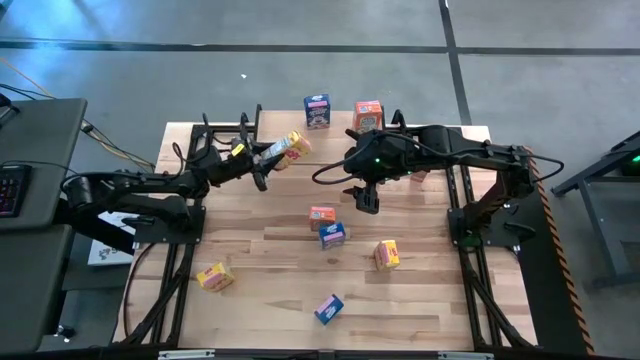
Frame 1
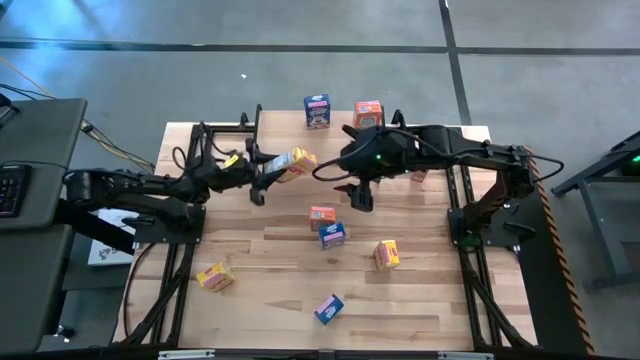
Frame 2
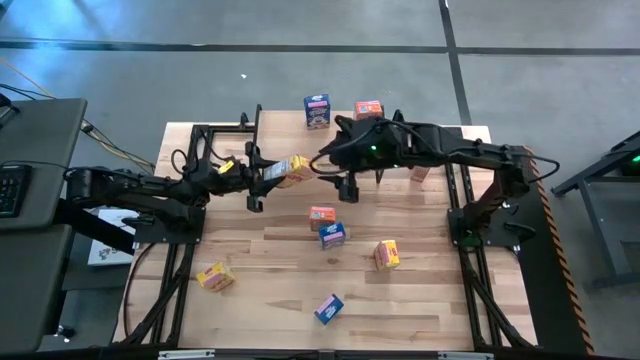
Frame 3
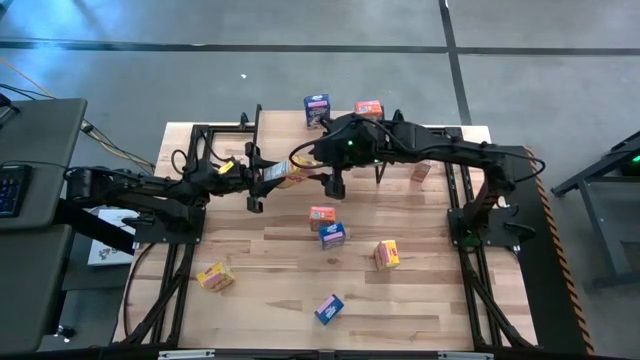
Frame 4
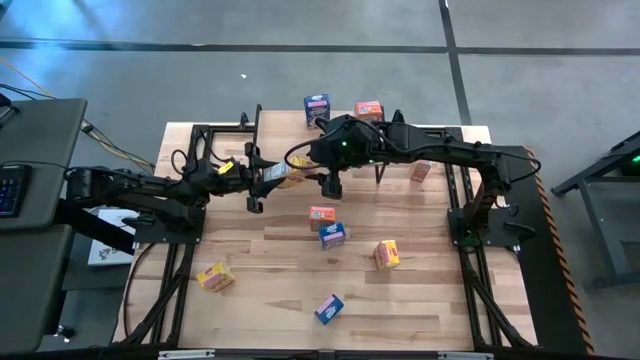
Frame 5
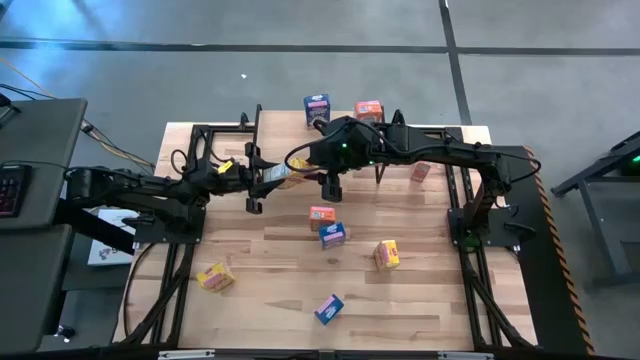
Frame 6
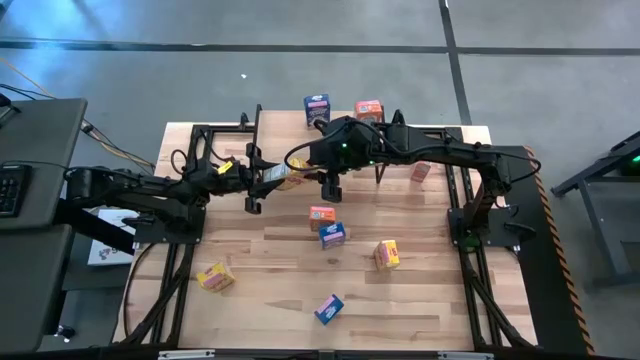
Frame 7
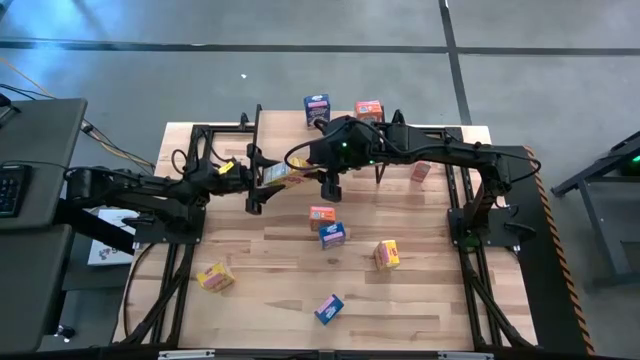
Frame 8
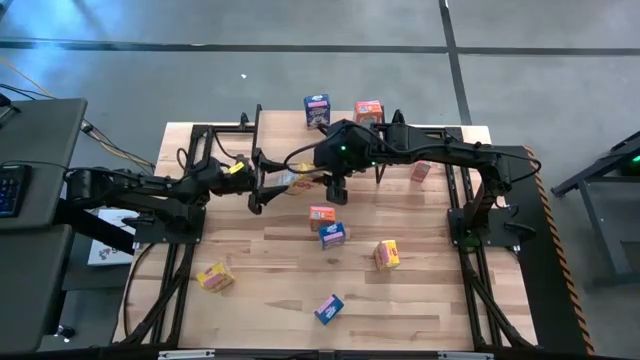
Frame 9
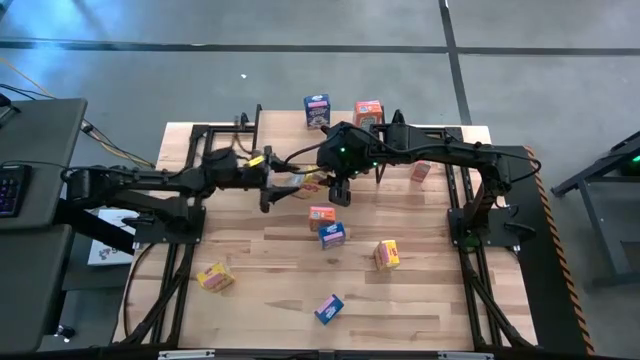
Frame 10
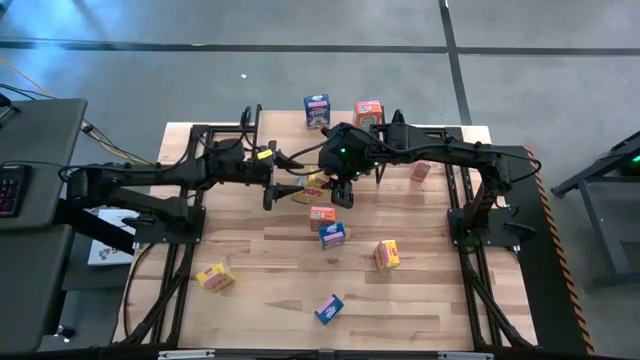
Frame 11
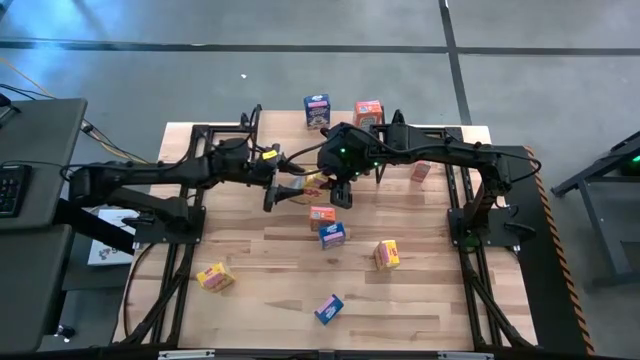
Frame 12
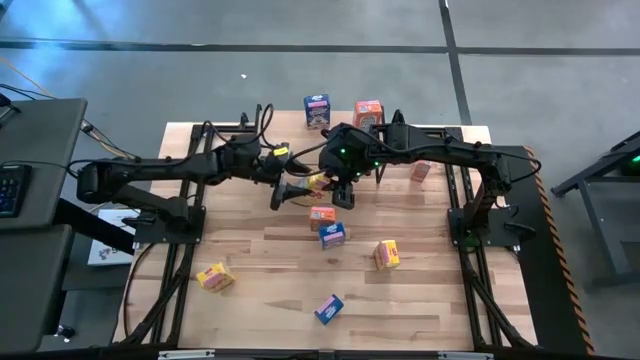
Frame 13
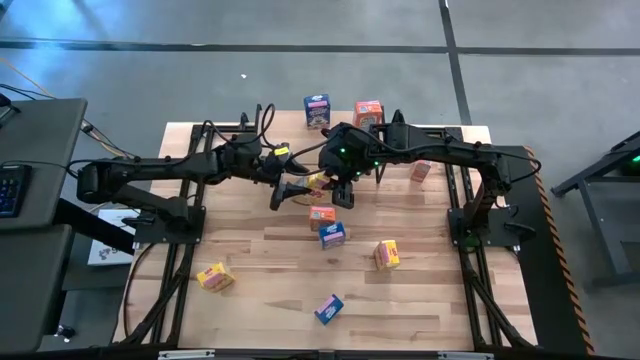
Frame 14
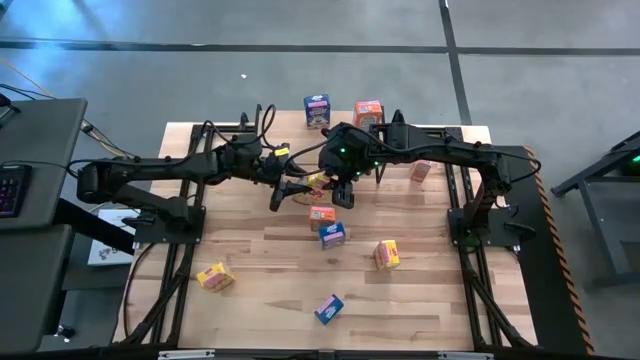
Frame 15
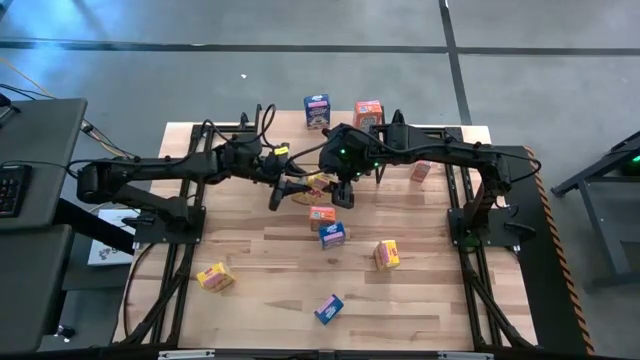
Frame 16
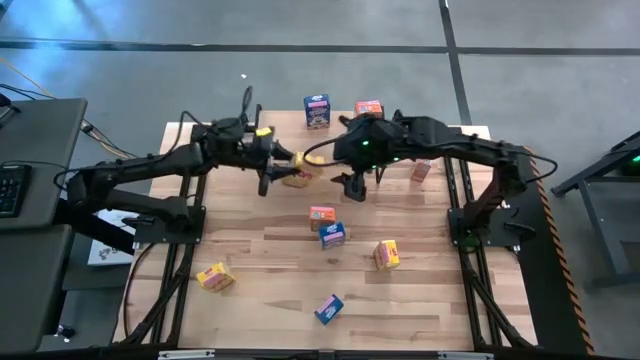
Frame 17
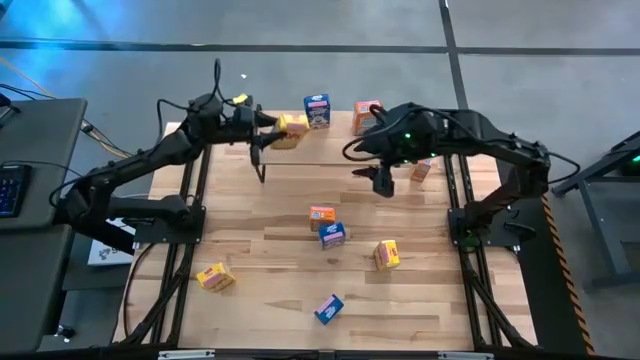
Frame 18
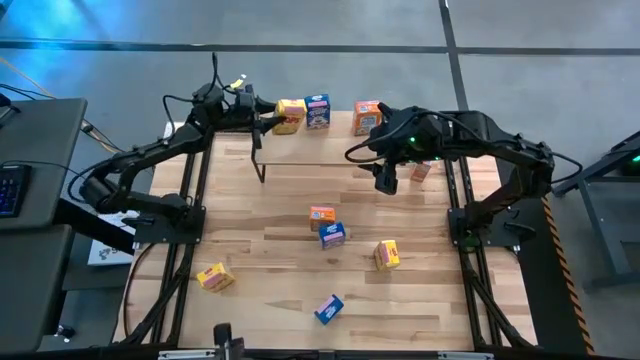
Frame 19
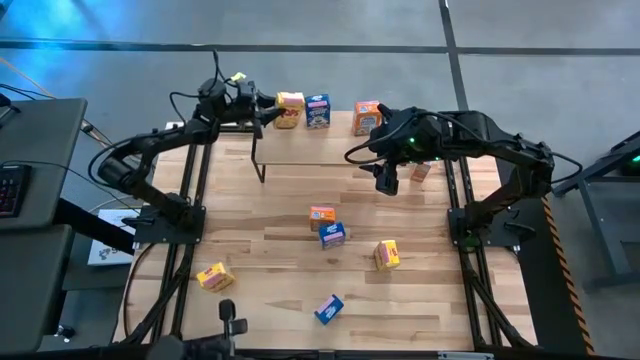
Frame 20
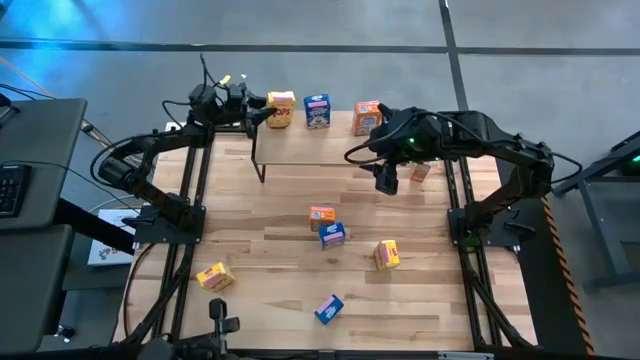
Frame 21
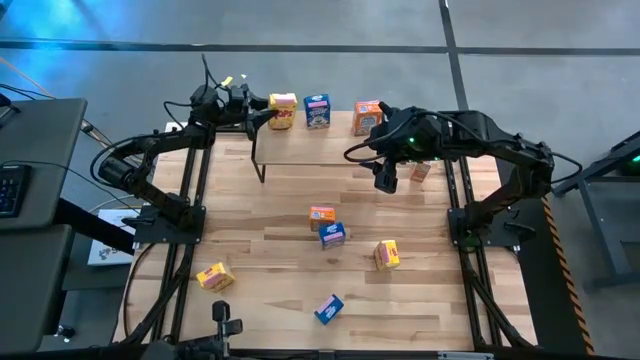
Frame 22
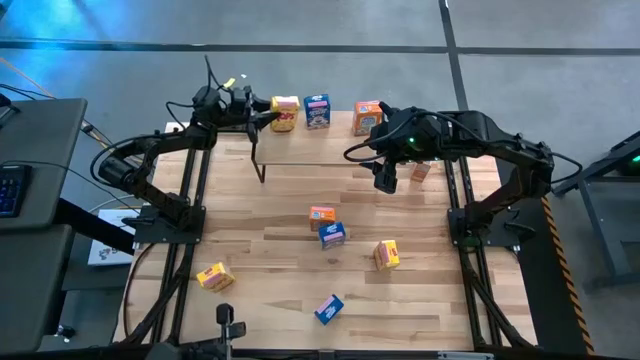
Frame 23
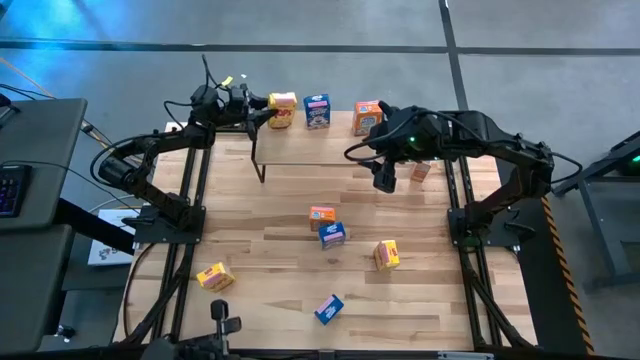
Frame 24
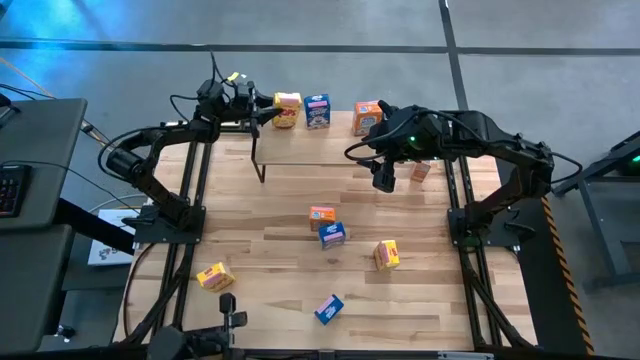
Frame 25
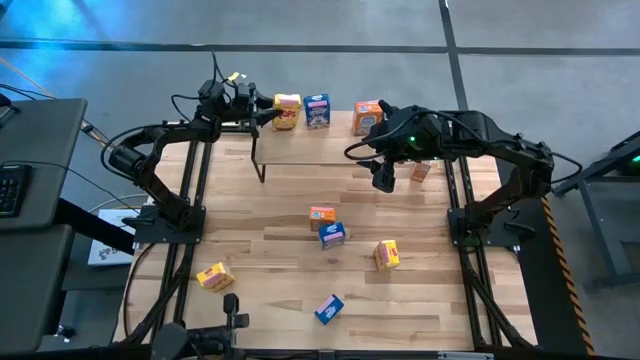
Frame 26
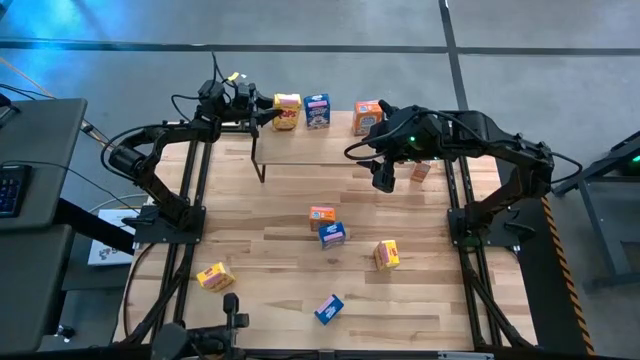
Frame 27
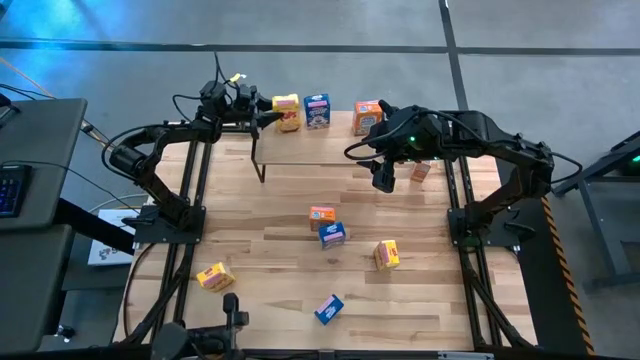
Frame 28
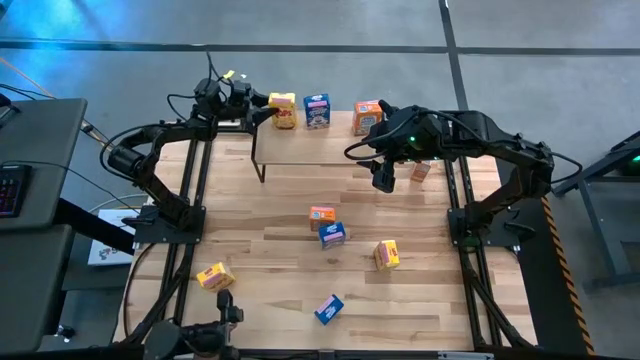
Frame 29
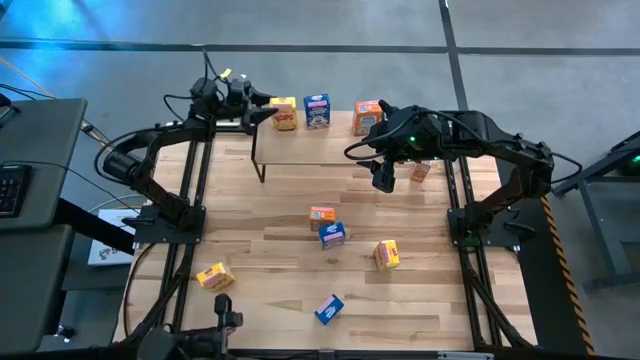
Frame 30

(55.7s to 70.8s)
Task: Stack cereal on shelf
Put the bottom right yellow cereal box on the shelf

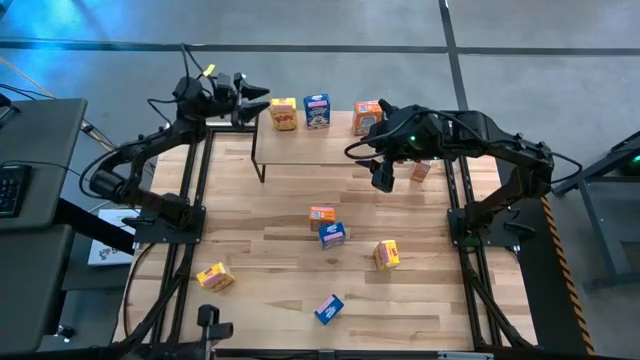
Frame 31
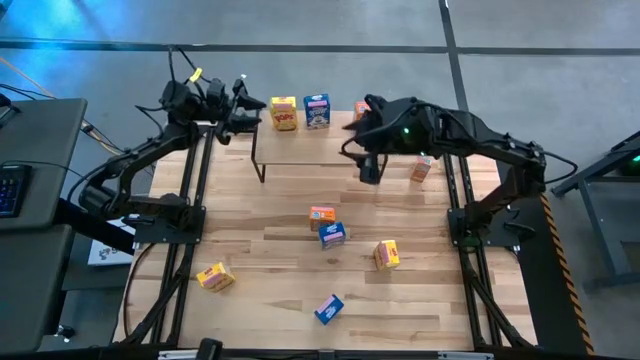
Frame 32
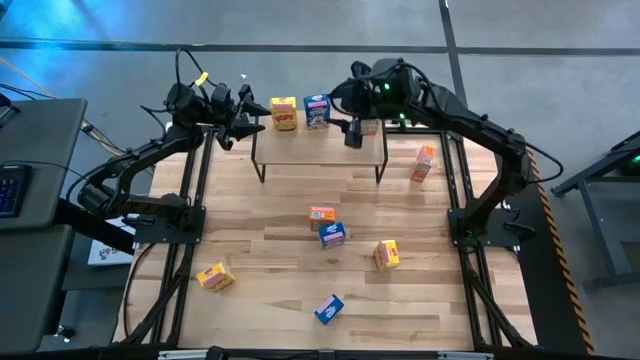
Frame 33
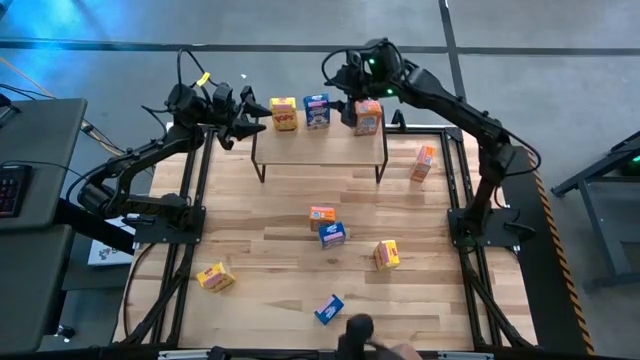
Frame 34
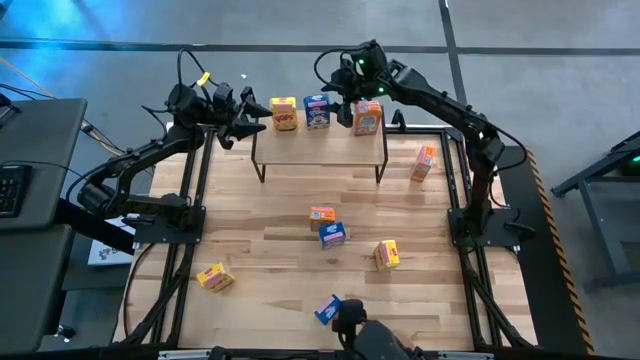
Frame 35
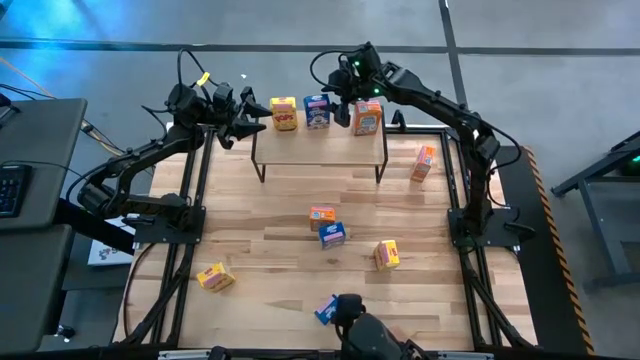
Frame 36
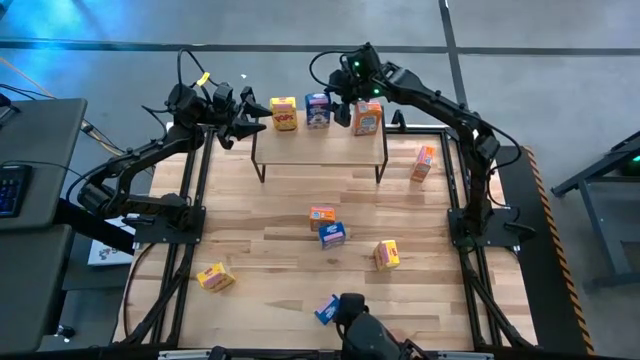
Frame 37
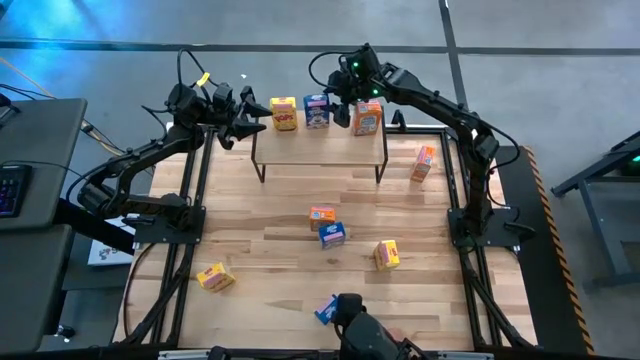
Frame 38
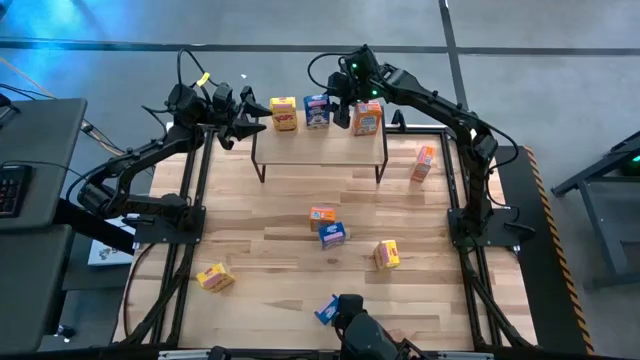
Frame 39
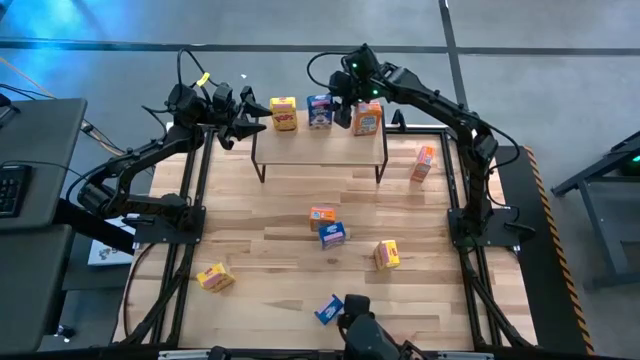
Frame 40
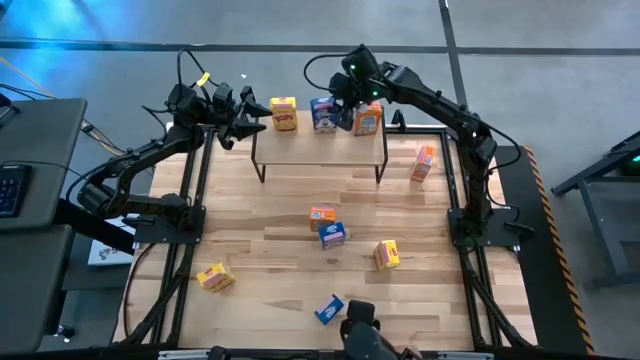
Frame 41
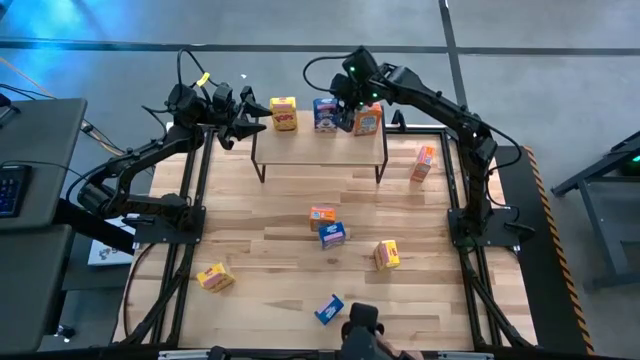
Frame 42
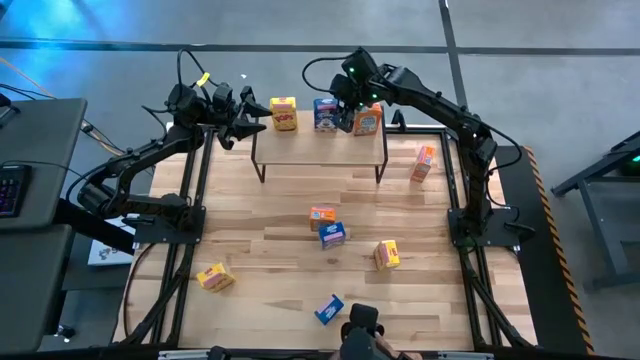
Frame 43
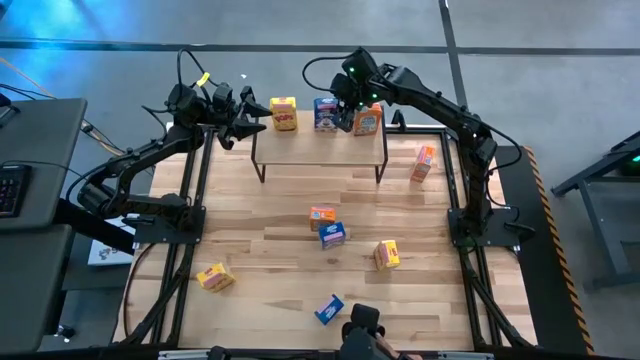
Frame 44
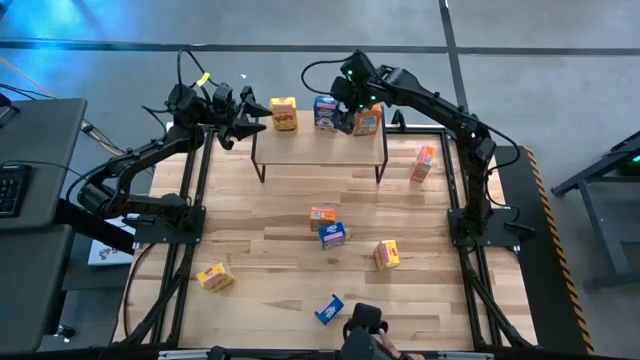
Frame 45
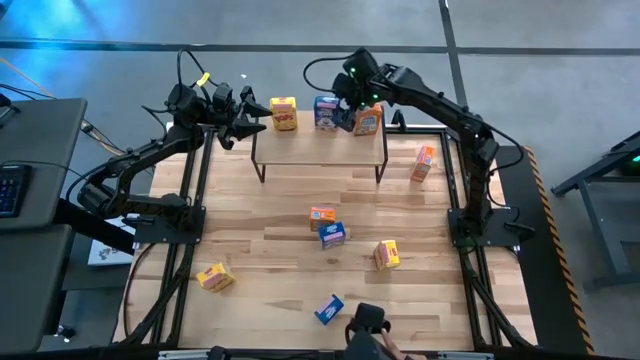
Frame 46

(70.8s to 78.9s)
Adjust the blue cereal box on the shelf
